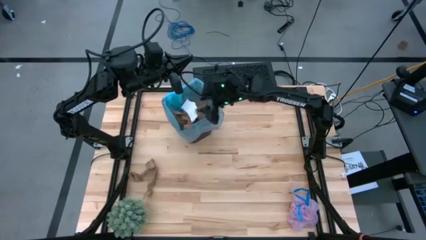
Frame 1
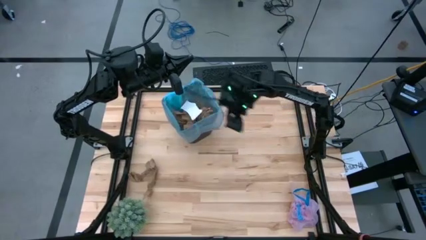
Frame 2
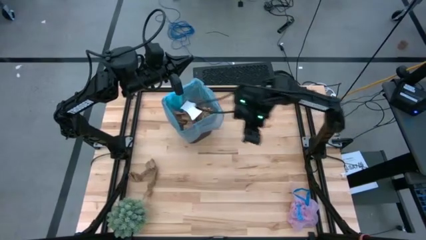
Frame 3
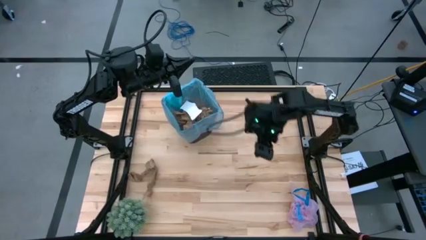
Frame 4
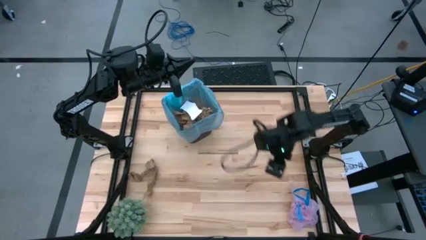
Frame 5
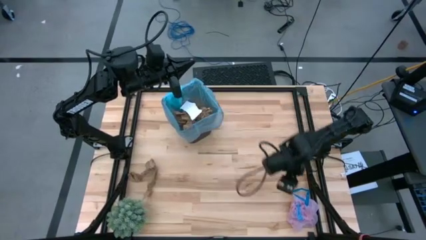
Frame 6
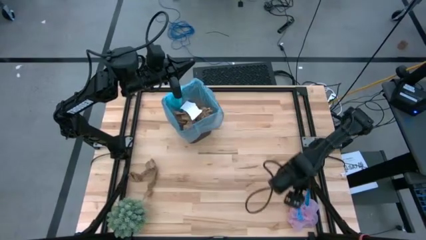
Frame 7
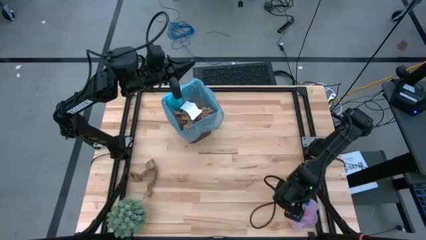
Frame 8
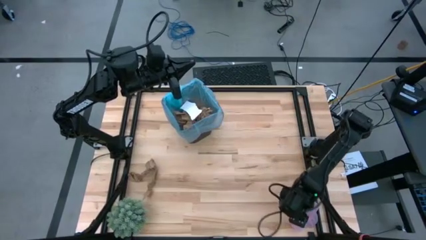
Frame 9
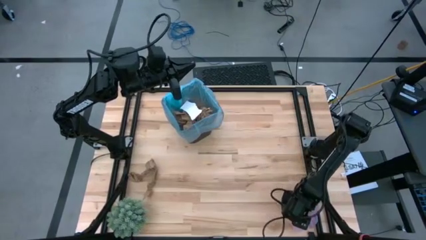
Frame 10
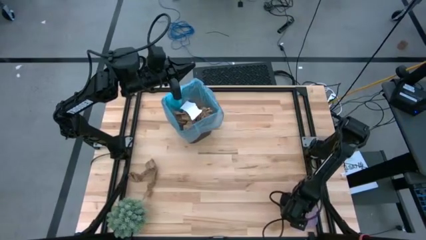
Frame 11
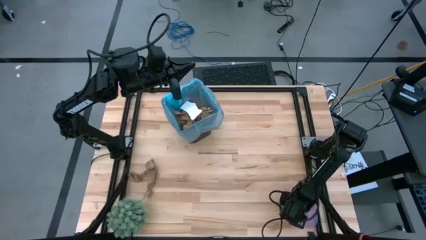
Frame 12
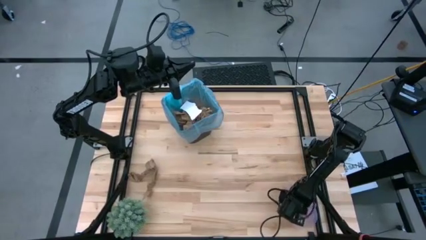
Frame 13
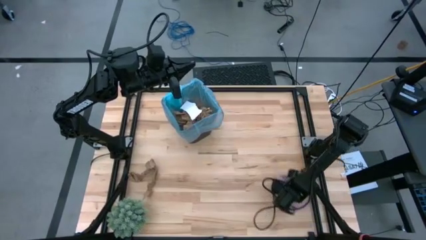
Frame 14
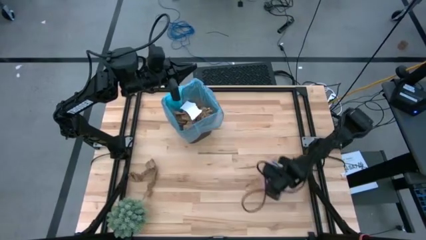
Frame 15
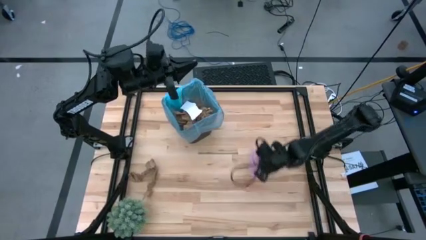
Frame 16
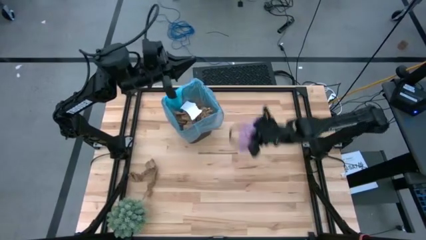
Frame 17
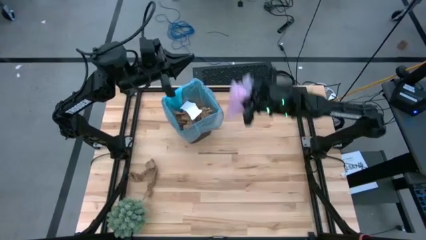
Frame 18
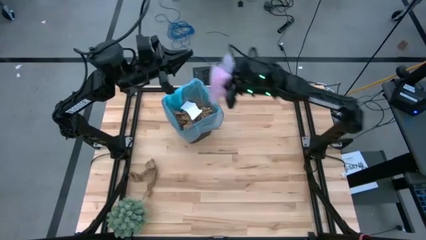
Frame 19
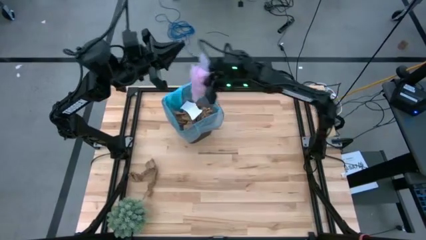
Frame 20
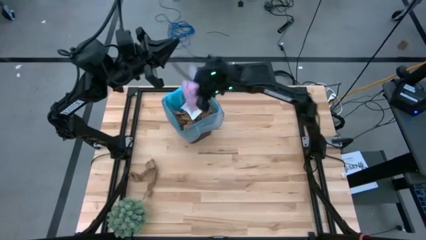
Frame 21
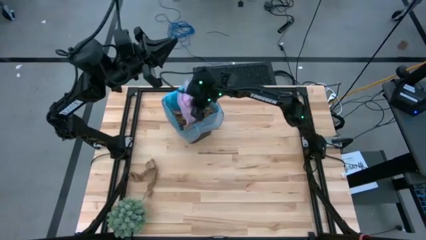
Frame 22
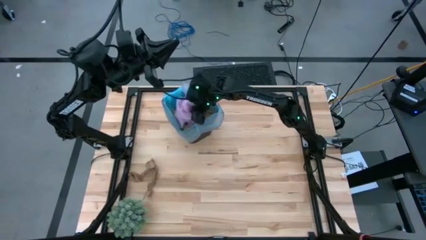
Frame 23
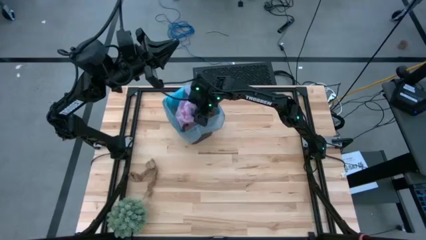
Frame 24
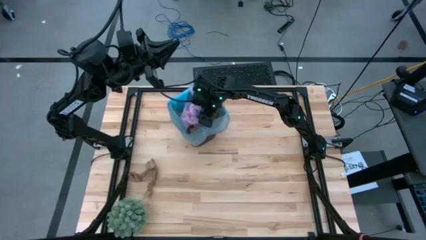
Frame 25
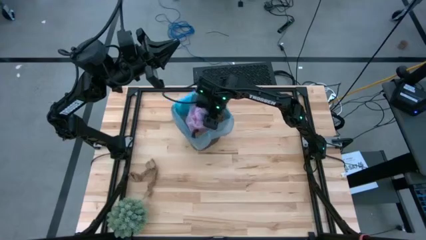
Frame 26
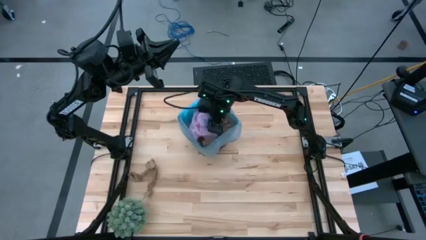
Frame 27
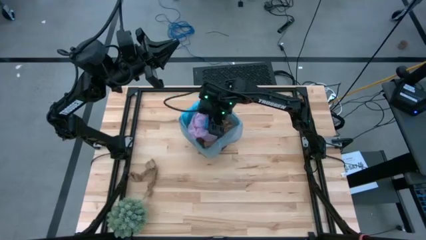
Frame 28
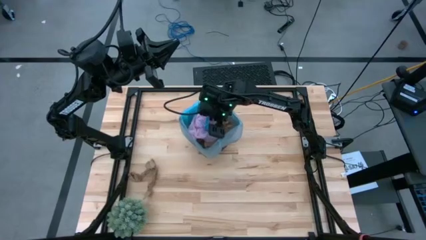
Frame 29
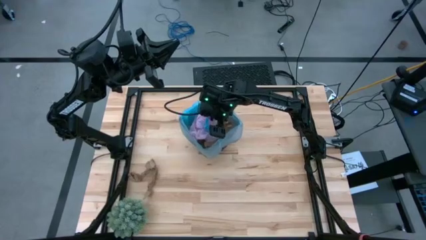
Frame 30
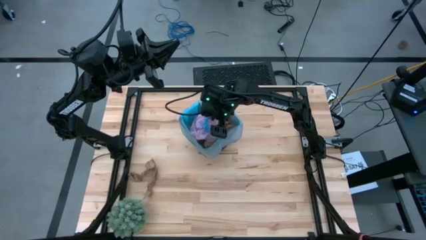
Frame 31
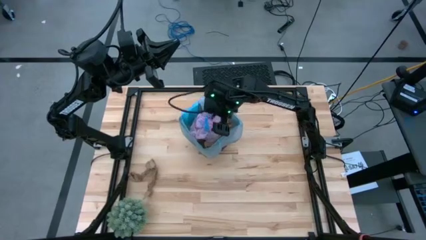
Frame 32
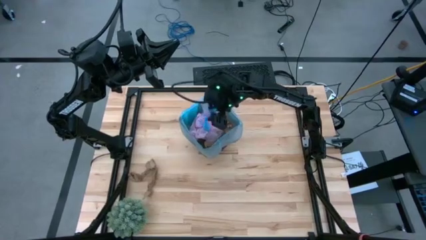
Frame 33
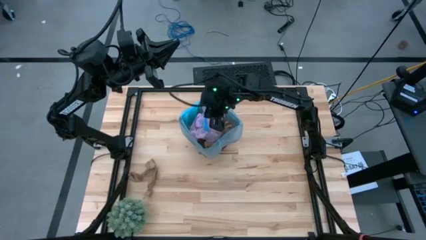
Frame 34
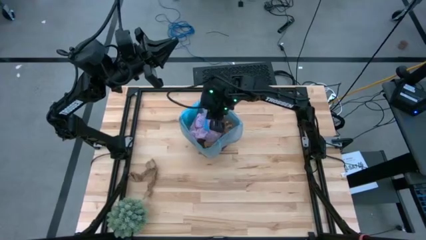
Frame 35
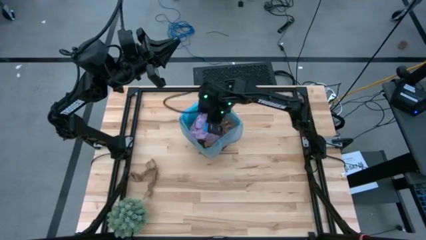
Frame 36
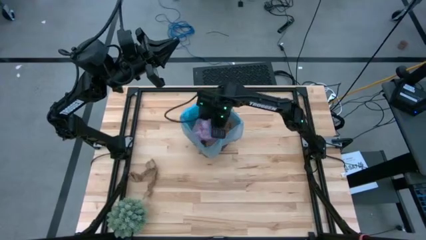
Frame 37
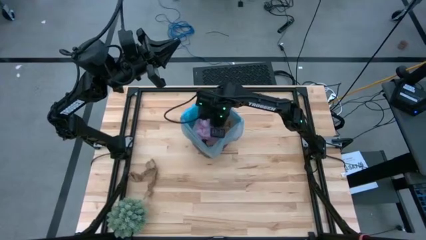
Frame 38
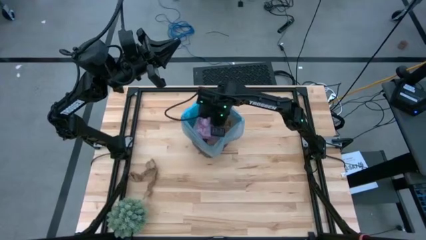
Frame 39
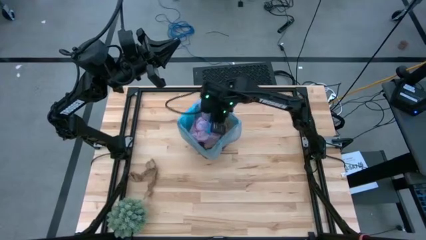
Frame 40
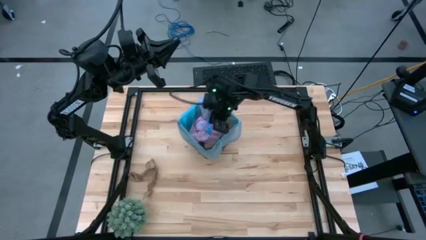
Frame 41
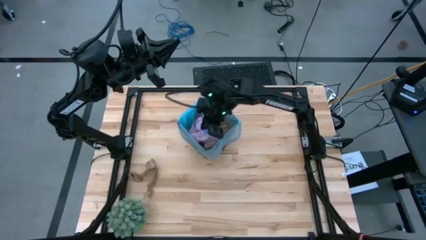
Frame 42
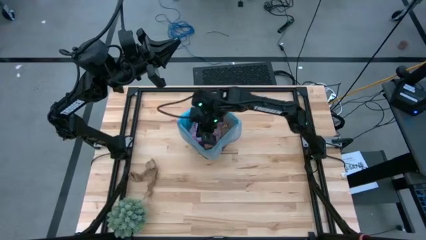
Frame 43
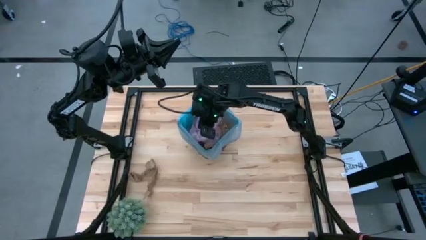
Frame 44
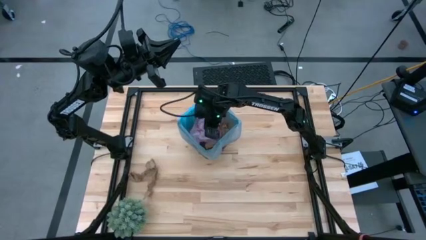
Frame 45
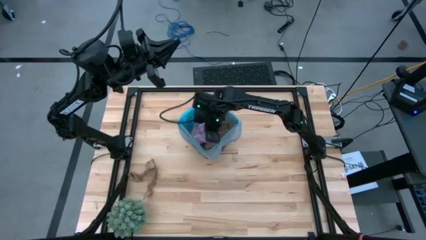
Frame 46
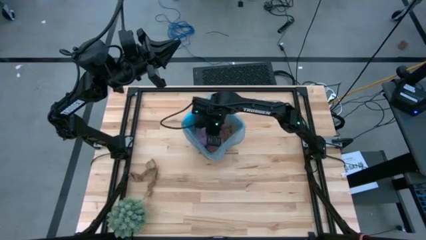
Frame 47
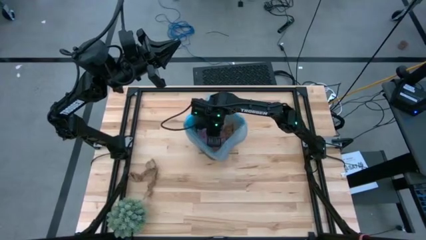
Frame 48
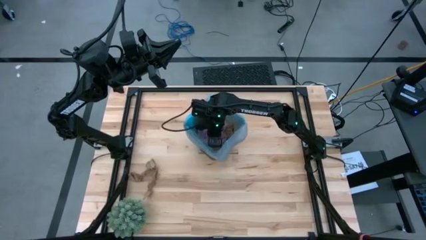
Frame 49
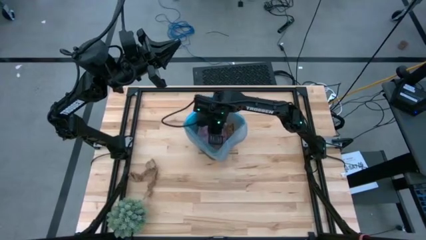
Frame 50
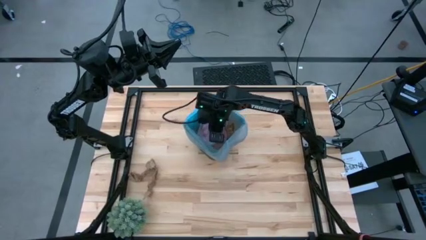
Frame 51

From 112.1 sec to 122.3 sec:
Task: Pick and place trash into bin
Put the pink plastic bag into the brown trash bin

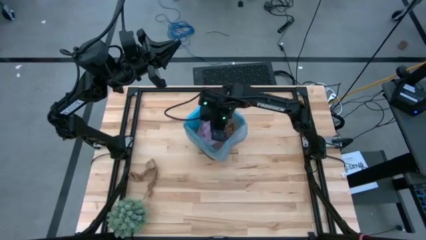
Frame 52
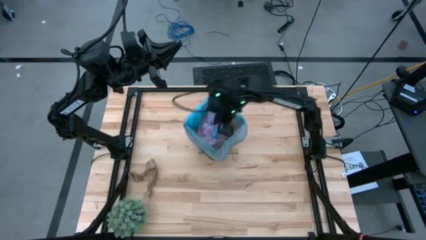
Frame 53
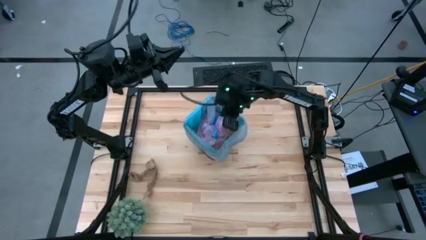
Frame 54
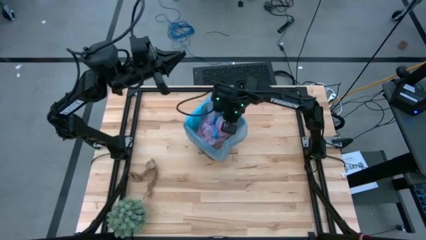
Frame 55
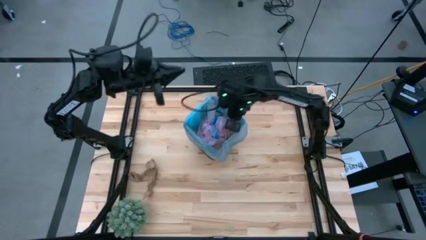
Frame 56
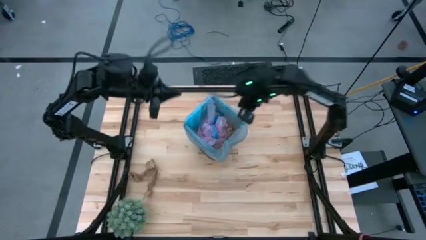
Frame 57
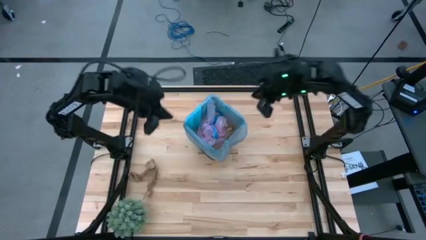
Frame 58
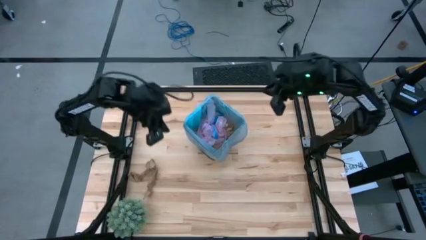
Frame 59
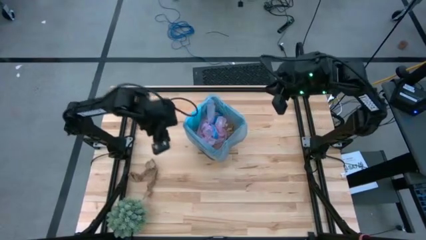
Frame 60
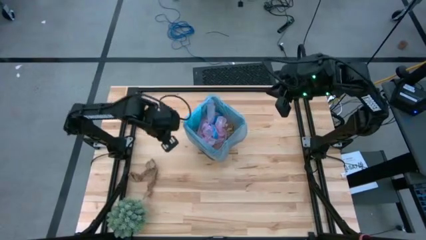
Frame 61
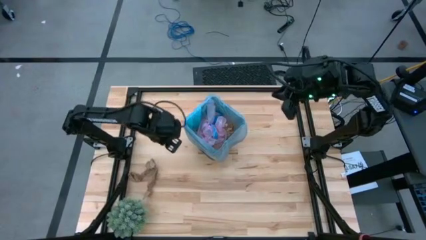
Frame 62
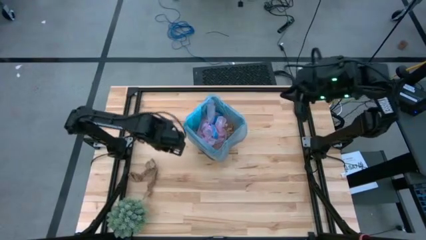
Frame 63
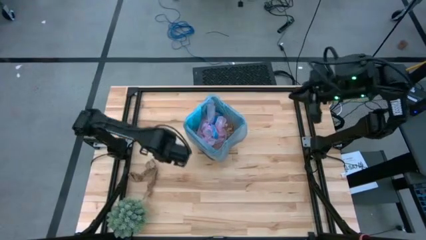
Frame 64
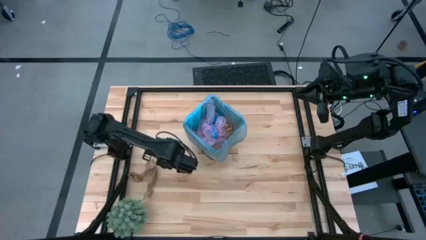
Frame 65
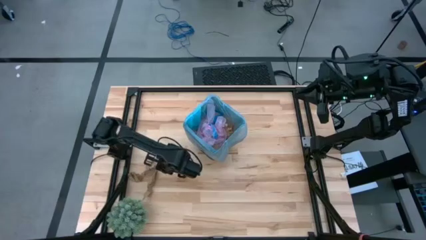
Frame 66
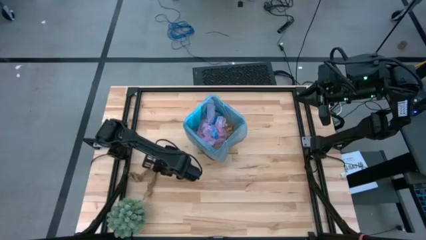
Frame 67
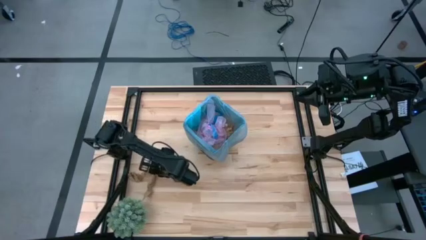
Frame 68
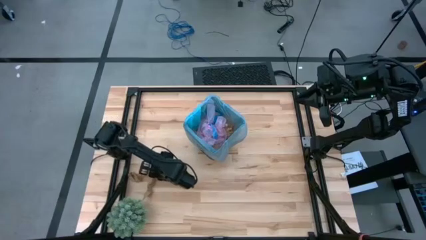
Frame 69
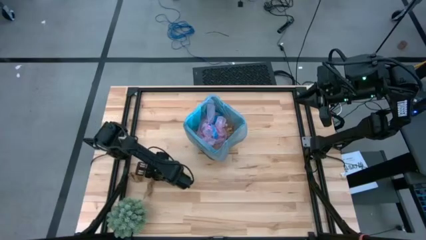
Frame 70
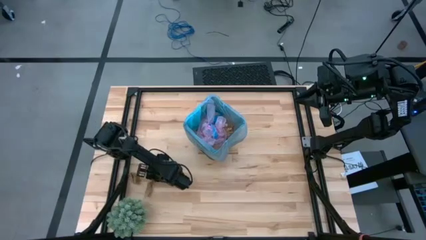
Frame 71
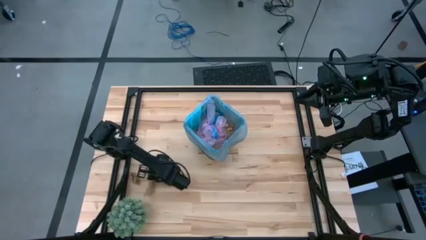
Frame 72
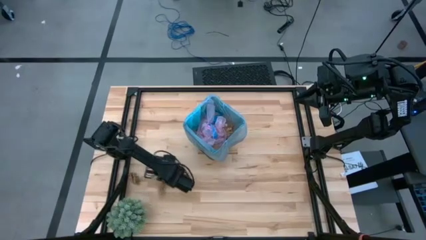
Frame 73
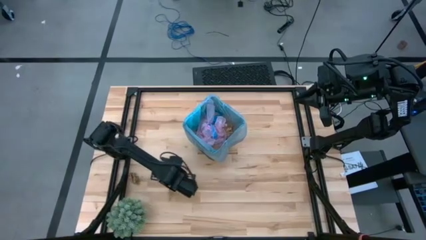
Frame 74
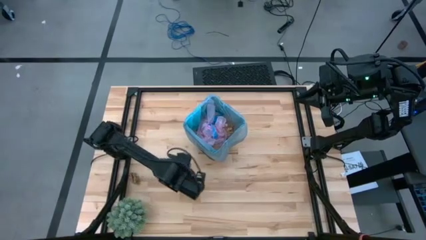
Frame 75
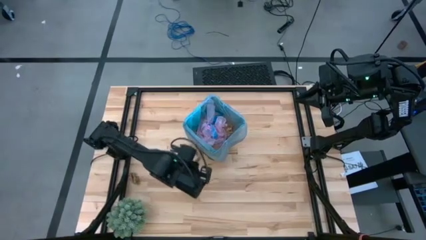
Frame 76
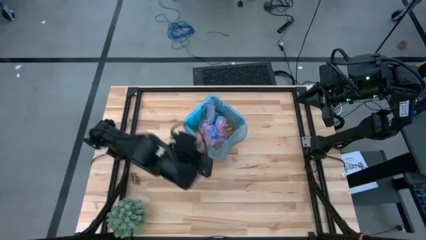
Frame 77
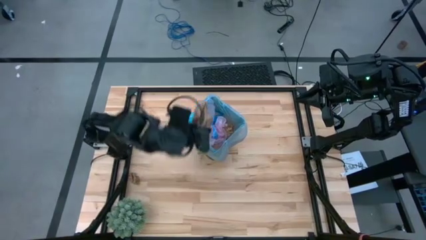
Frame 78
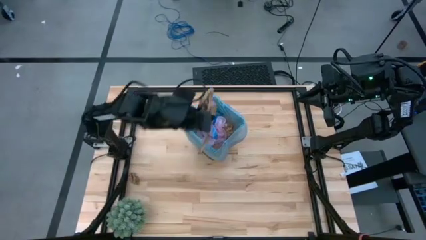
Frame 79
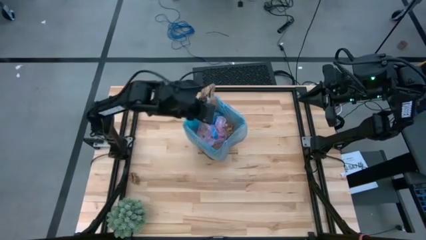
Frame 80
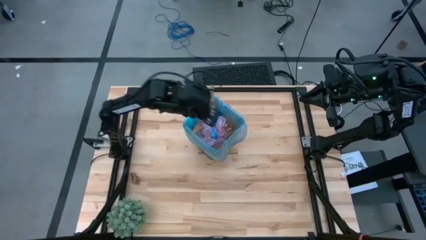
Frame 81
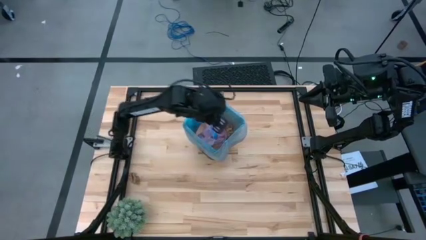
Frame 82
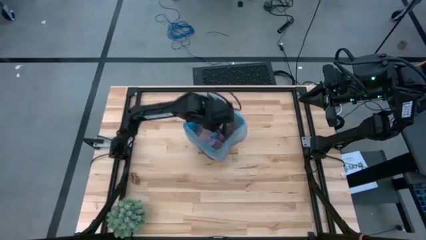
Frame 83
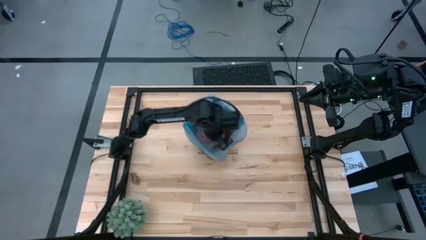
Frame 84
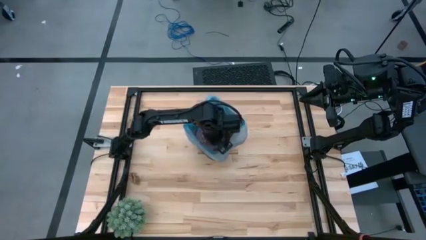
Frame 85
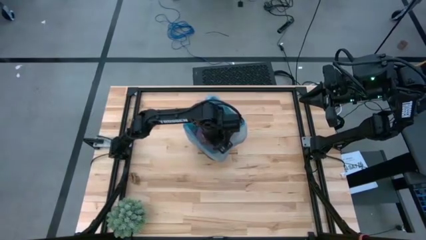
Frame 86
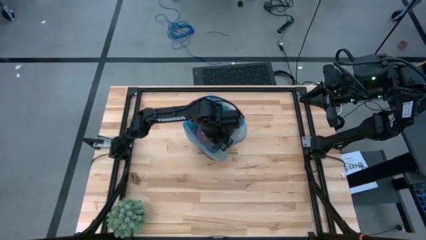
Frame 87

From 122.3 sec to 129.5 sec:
Put the brown paper into the brown trash bin
